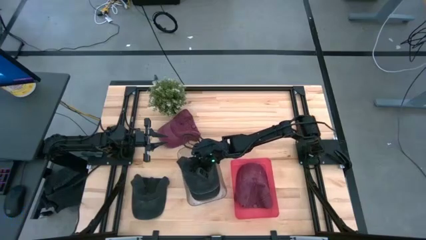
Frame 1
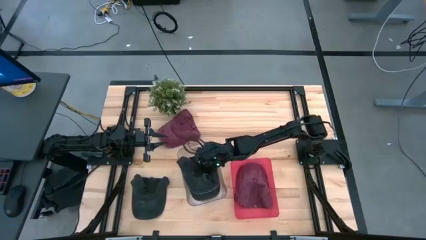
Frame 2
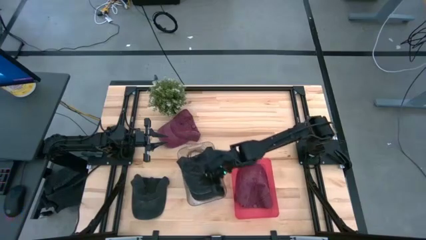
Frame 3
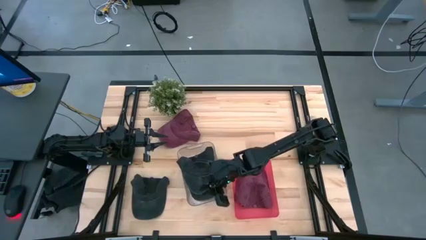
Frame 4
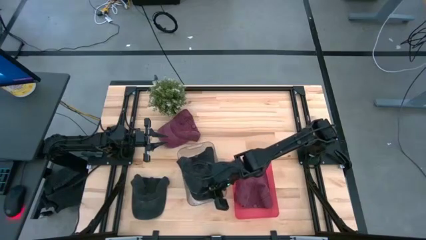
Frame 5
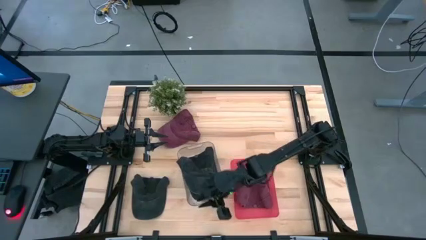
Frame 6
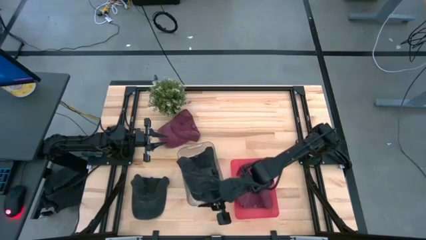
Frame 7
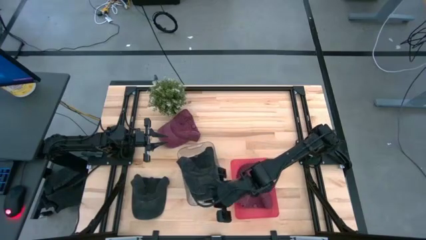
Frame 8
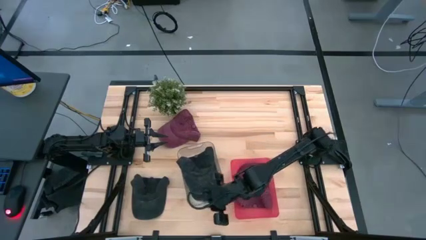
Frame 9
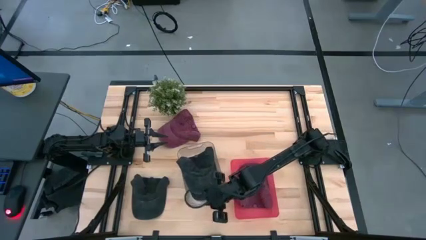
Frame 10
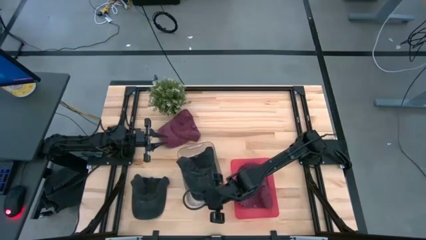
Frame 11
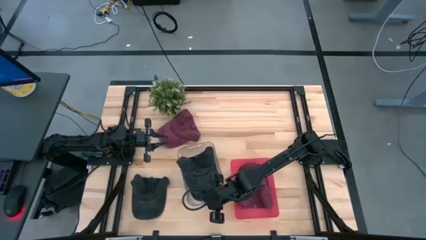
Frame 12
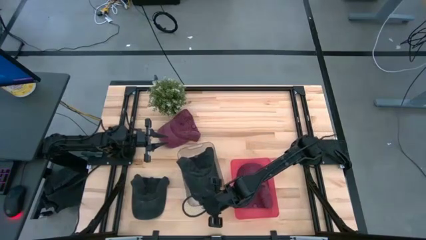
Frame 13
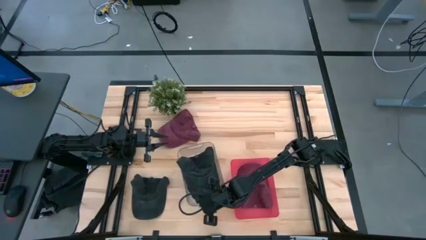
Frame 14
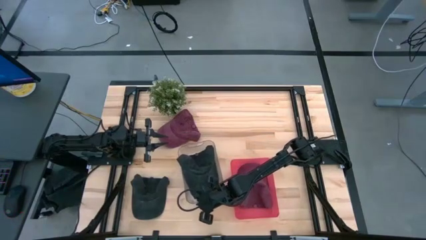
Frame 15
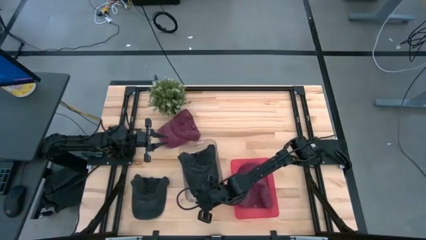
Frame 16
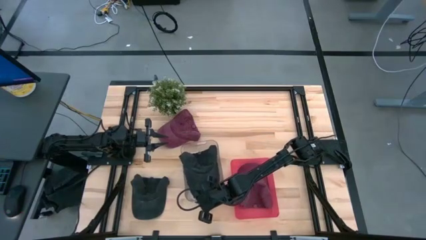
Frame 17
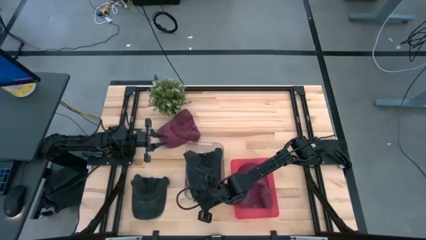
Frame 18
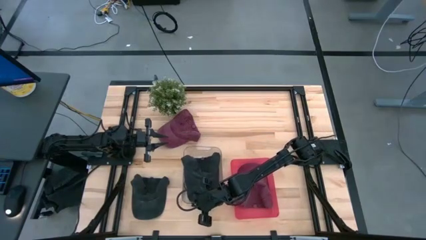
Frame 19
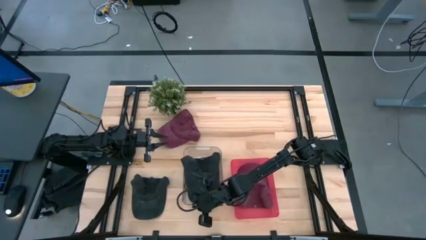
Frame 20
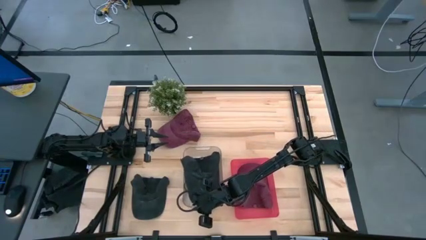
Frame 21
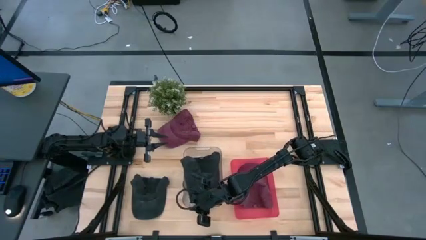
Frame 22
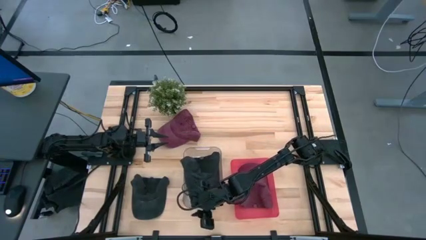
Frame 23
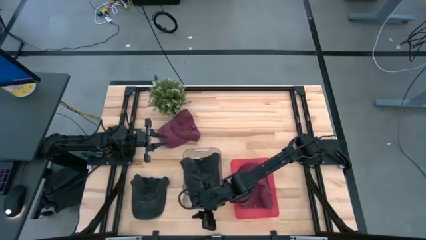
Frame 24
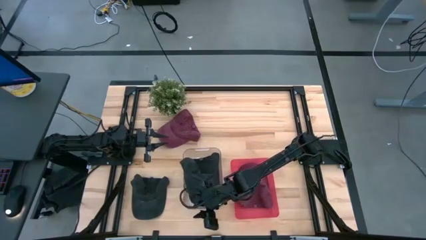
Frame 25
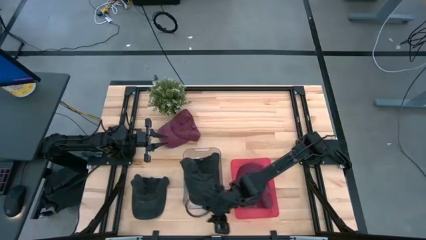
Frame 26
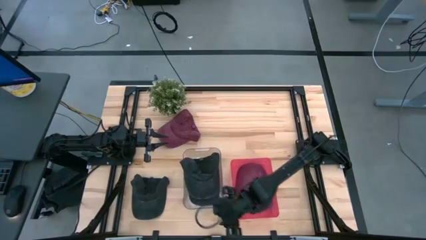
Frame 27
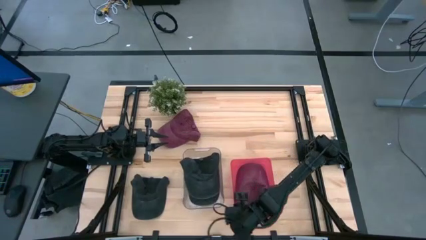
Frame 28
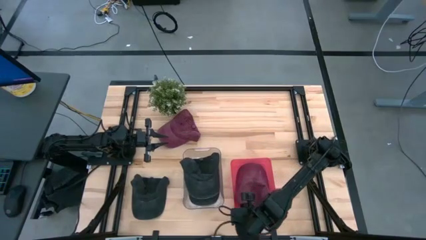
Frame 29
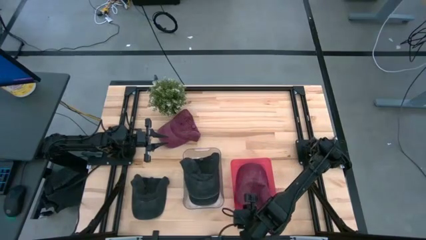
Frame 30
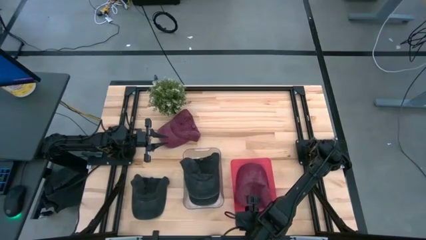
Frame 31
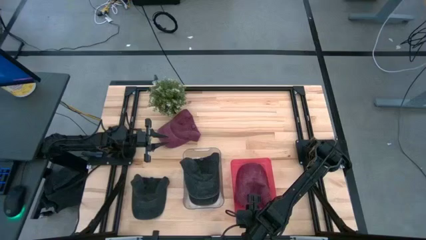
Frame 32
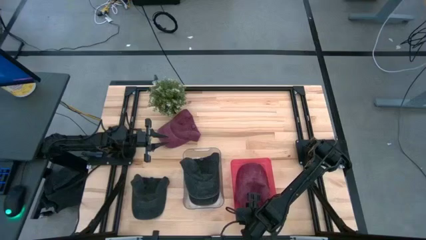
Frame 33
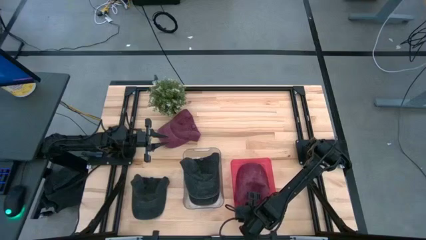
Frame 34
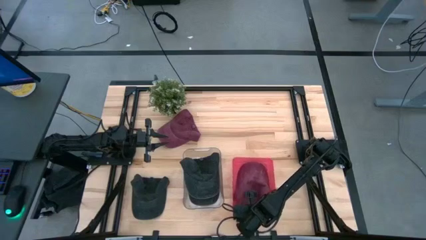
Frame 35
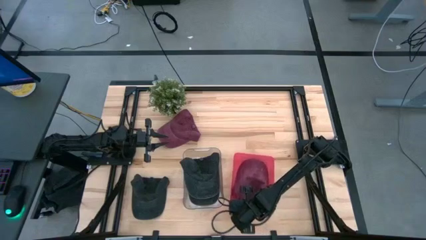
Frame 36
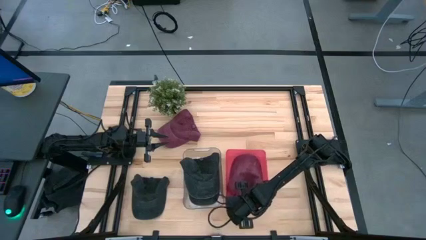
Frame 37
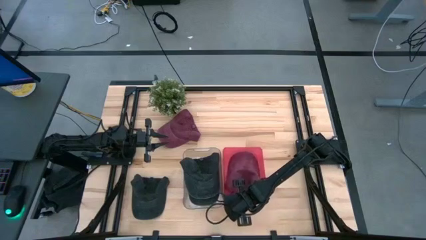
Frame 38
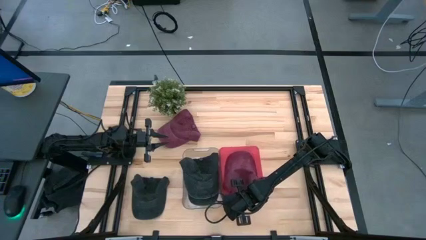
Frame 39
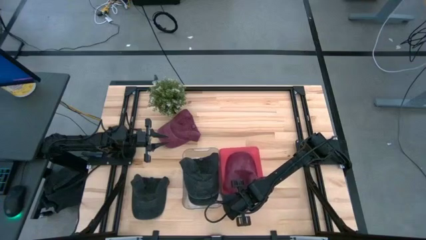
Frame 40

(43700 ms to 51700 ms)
Task: Pick & Place hat
Adjust the bins

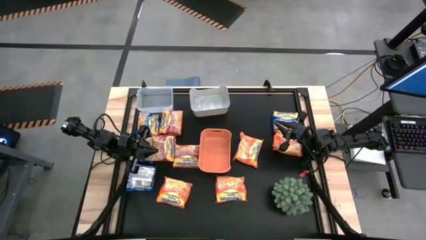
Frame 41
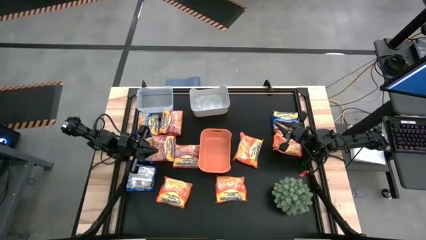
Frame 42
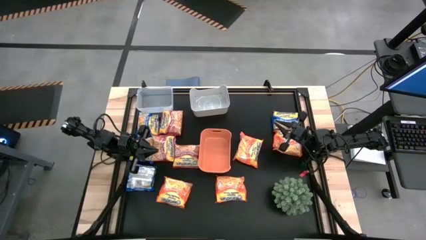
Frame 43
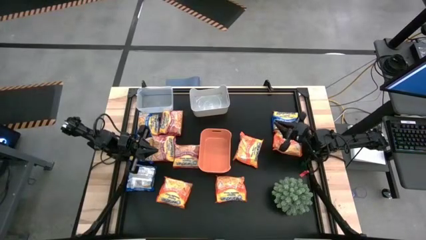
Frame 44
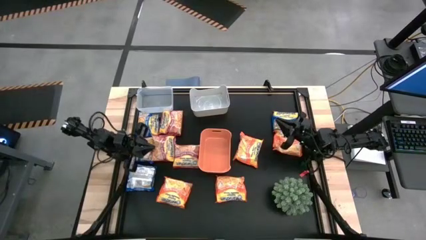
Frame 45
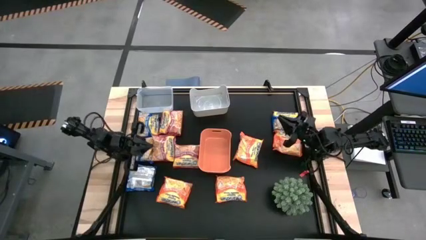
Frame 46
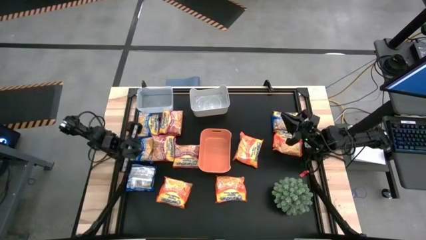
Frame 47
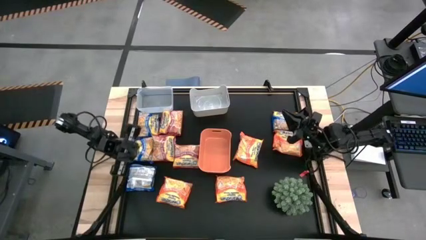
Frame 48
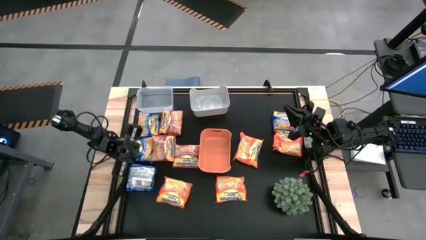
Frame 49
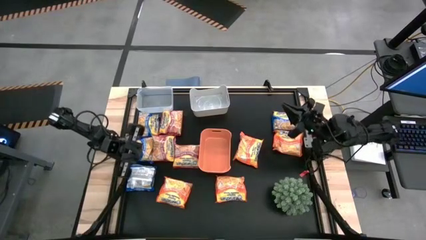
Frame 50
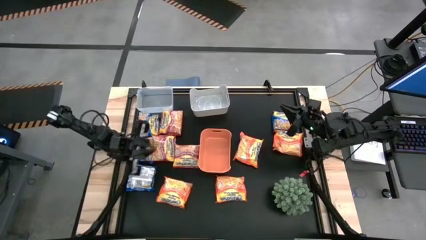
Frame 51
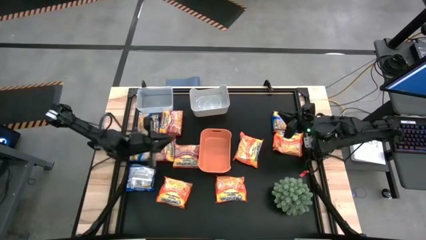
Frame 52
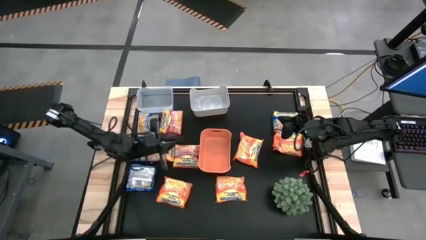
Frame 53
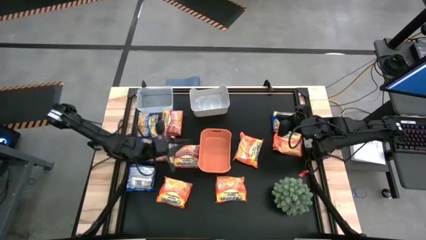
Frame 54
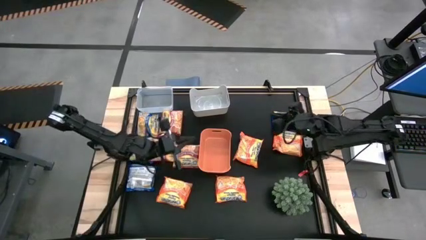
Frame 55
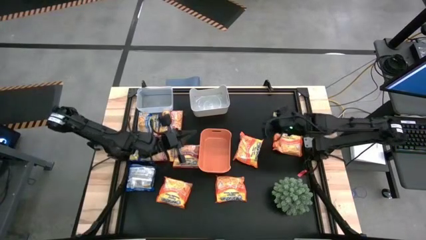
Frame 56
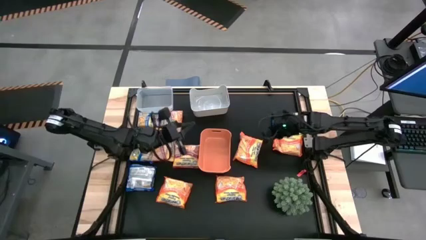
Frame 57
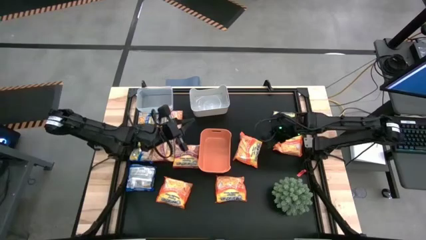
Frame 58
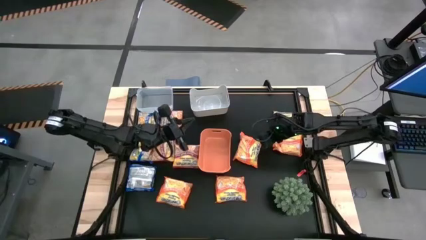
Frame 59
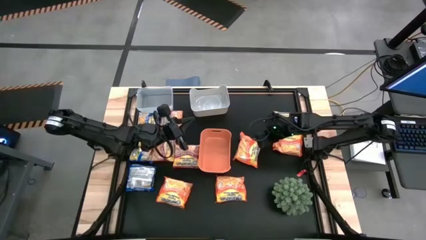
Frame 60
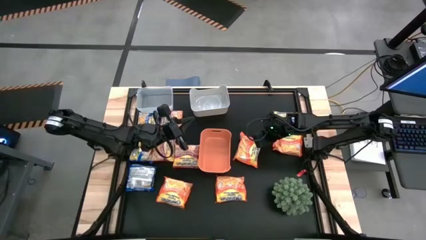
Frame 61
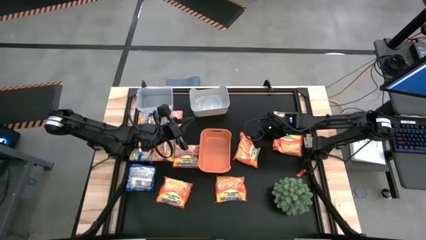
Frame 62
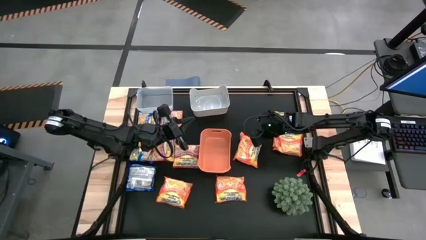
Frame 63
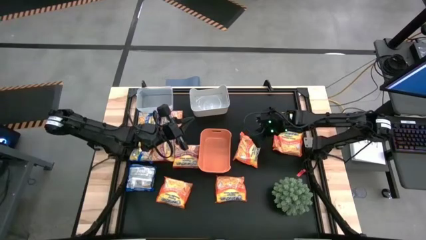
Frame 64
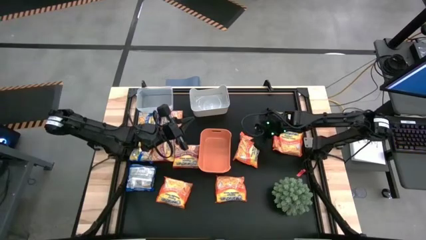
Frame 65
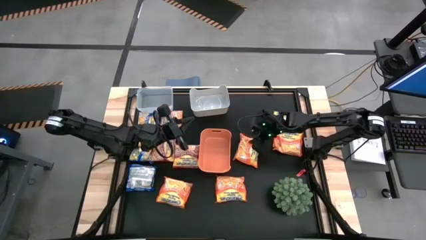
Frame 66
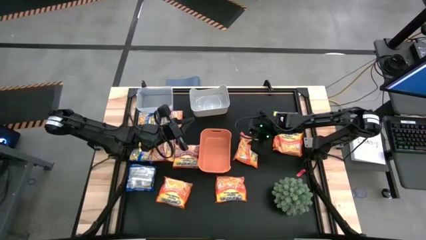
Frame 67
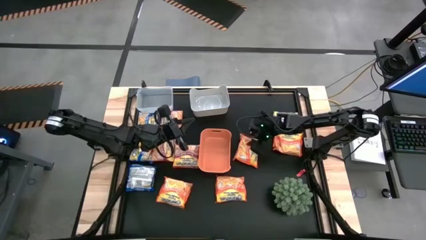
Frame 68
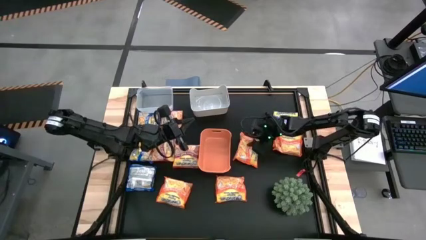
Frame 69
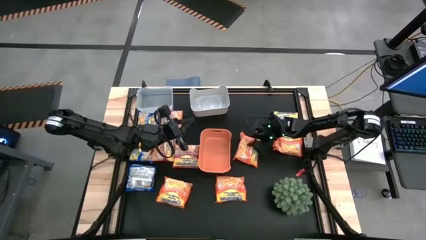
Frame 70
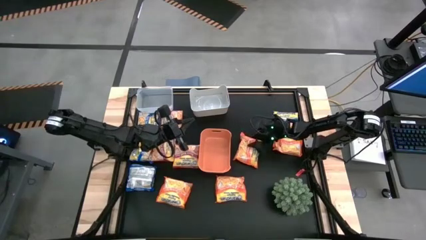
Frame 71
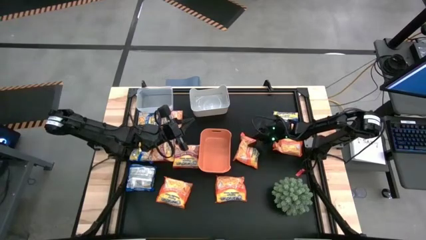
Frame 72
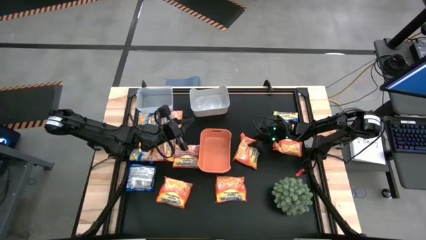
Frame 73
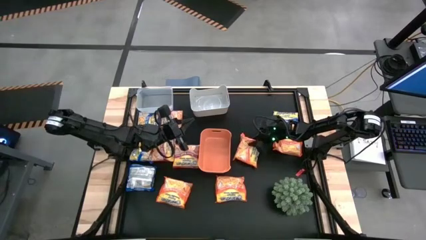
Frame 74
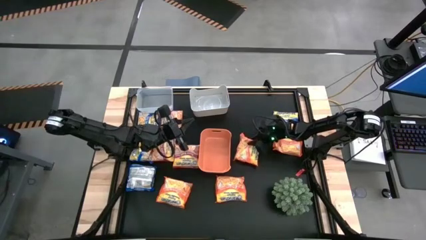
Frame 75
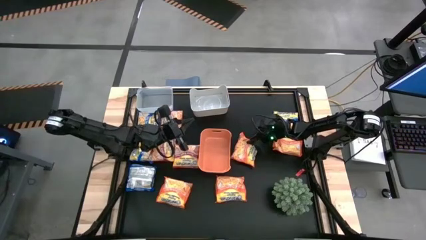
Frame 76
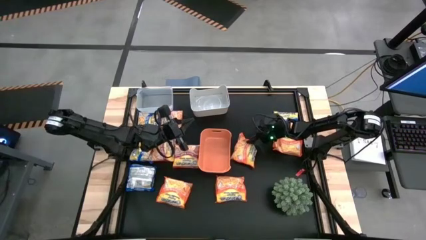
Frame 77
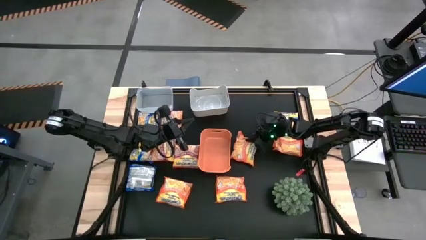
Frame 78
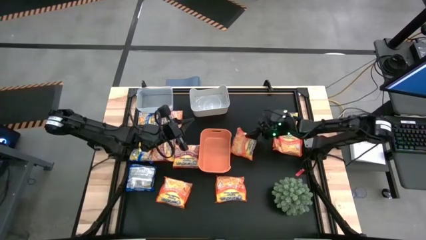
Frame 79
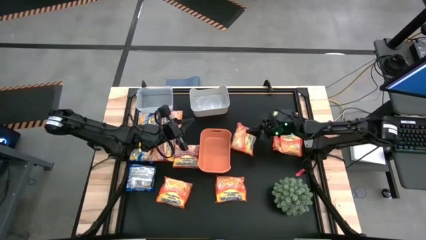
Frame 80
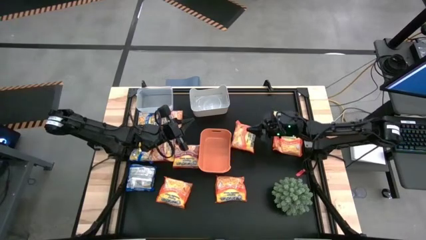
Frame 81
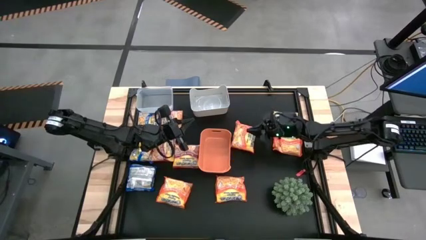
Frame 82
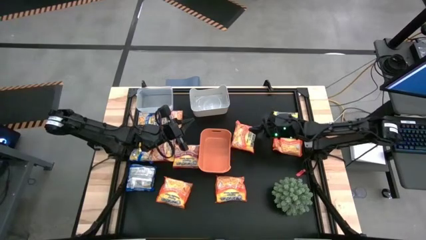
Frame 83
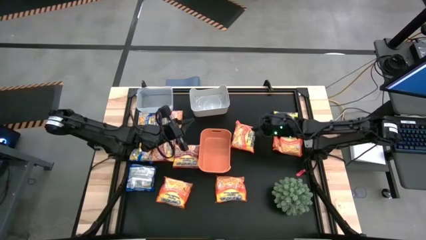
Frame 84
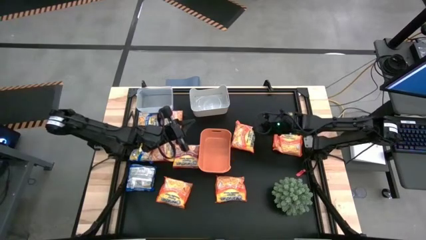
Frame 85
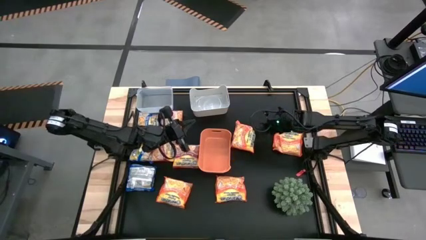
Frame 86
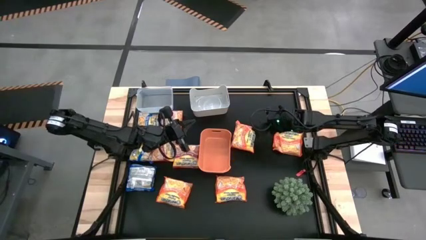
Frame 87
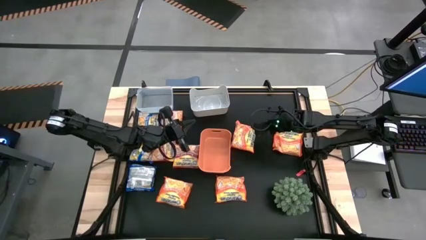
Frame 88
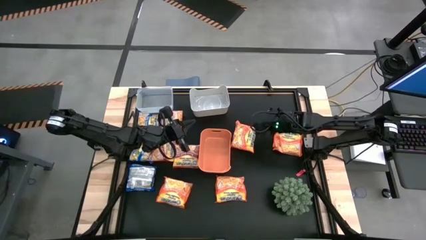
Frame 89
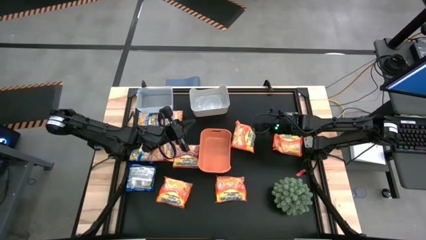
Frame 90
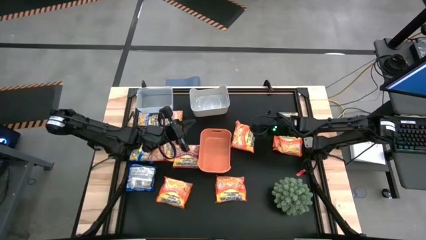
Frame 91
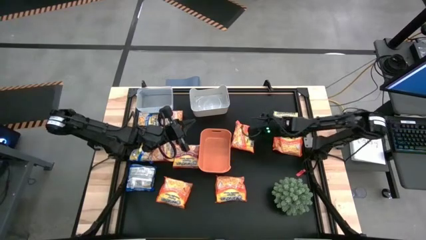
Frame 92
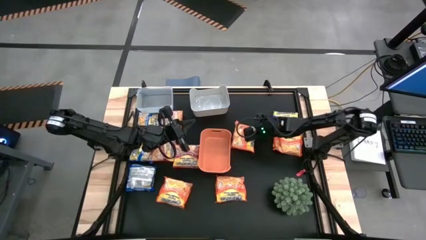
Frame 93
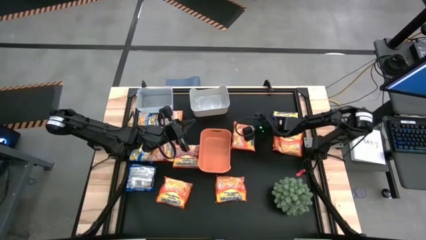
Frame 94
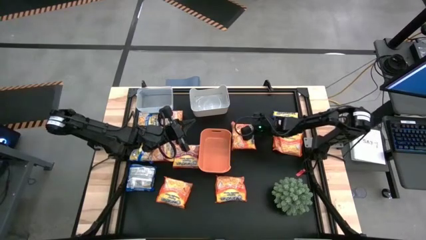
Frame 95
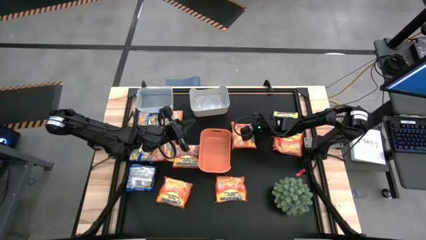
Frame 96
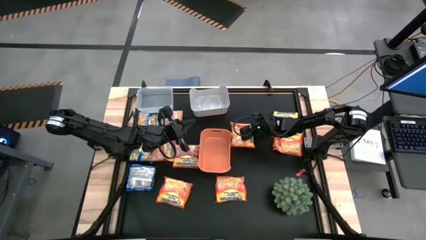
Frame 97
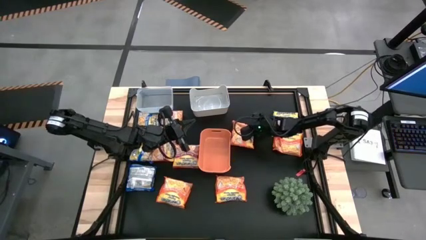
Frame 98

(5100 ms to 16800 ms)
Task: Sort Maruchan noodles
Put the orange bag into the white bin
